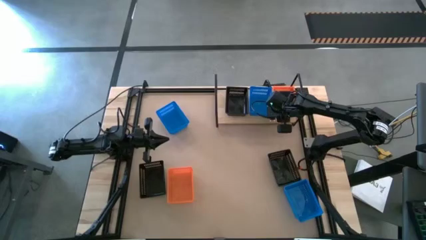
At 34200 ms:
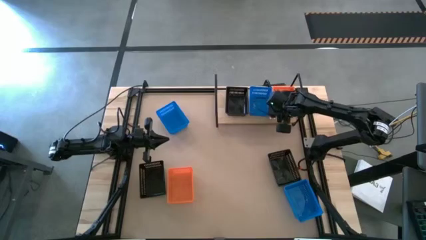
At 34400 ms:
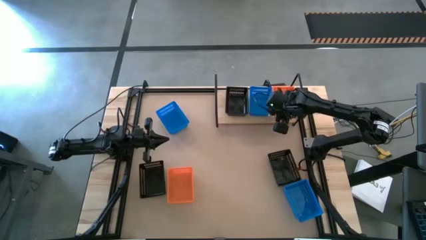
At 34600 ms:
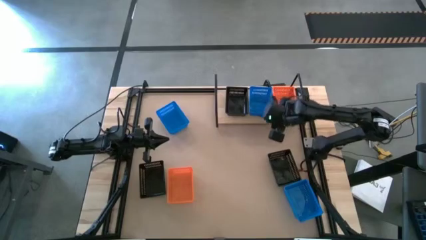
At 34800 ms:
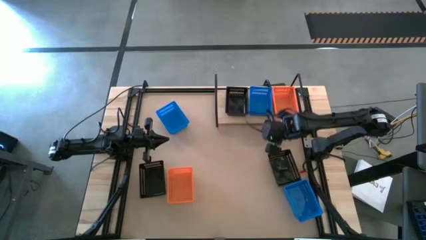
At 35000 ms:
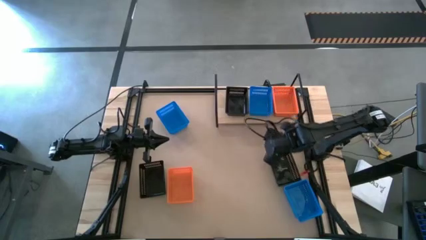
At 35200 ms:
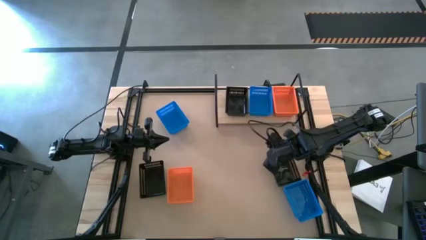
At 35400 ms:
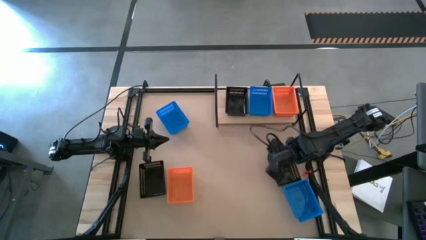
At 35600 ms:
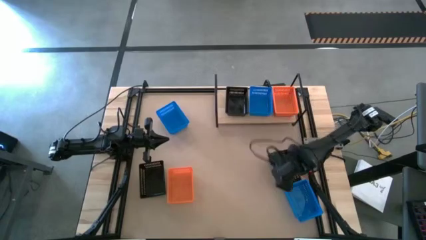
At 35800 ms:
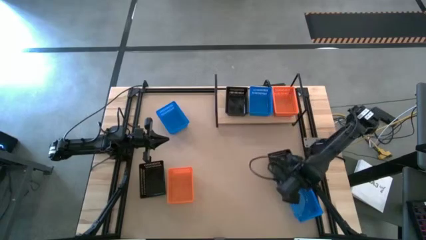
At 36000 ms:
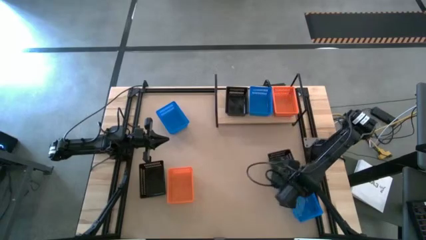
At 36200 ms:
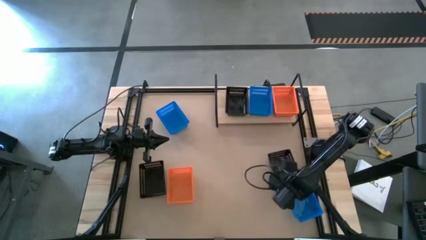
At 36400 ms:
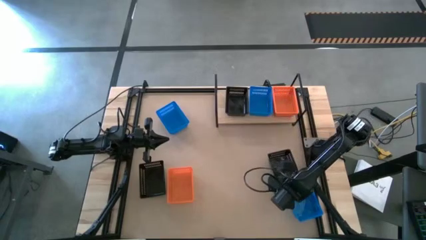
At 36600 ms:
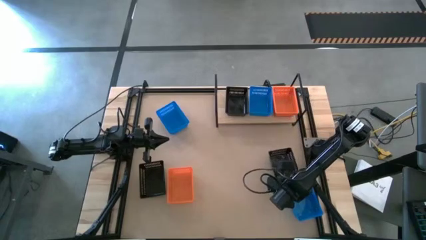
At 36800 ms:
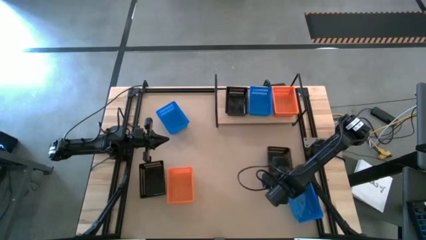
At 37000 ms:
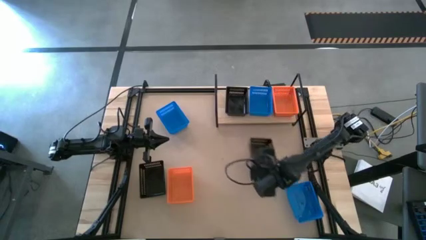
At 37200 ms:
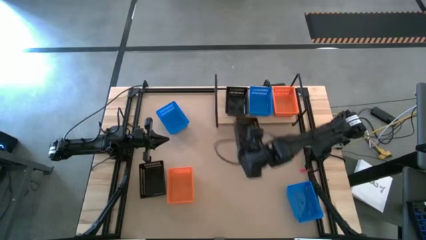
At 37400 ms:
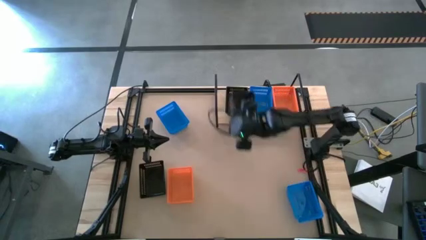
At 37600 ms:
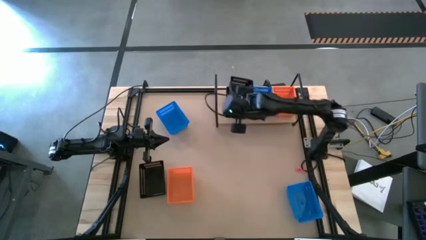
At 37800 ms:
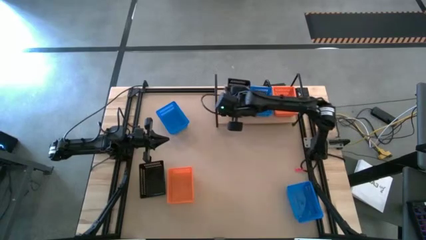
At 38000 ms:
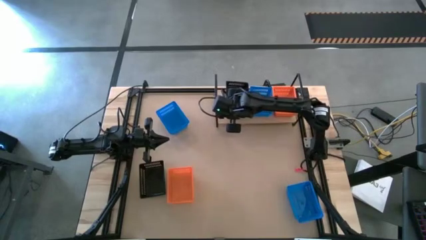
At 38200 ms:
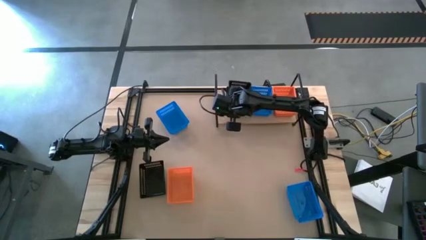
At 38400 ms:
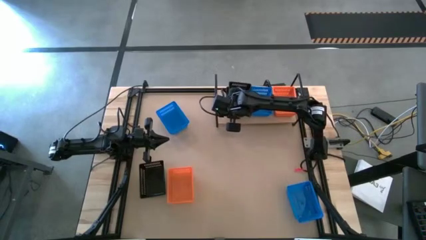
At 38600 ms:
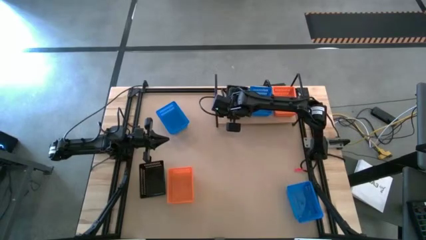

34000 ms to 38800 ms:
Task: Stack baskets on shelf by color
Stack the right black bin on top of the other black bin on the shelf

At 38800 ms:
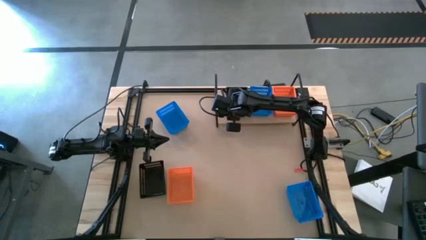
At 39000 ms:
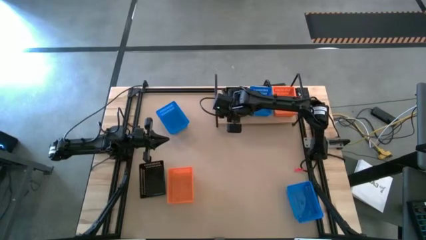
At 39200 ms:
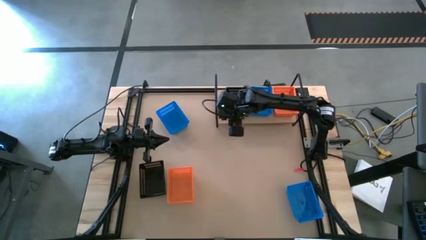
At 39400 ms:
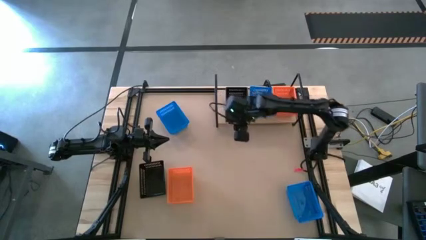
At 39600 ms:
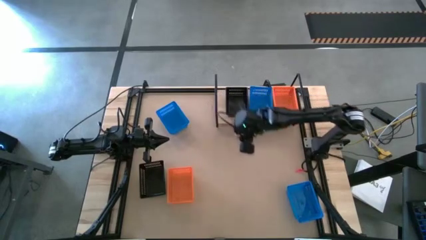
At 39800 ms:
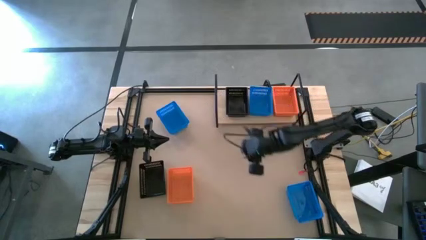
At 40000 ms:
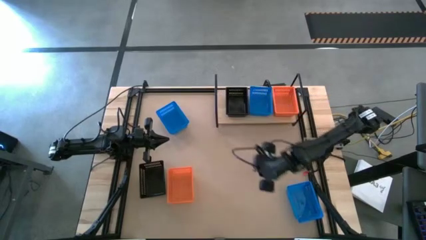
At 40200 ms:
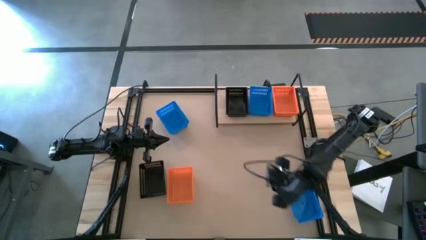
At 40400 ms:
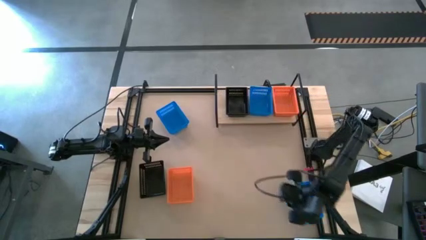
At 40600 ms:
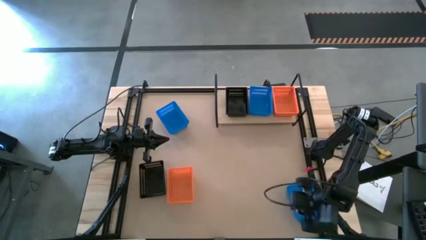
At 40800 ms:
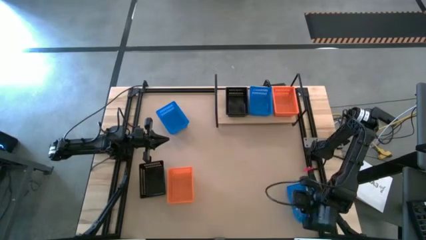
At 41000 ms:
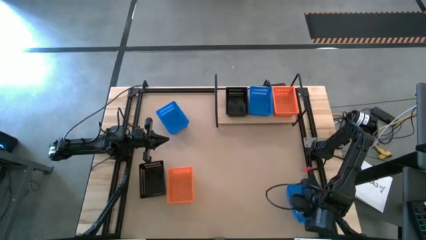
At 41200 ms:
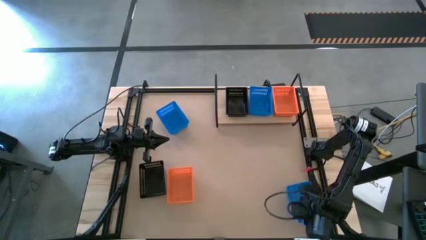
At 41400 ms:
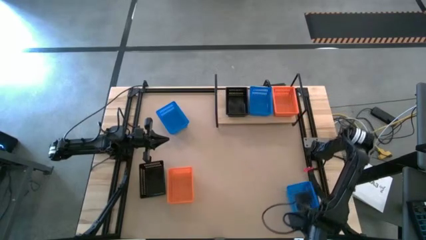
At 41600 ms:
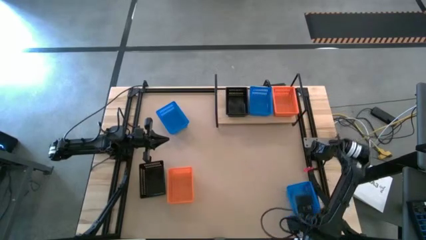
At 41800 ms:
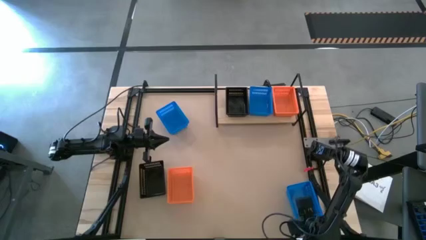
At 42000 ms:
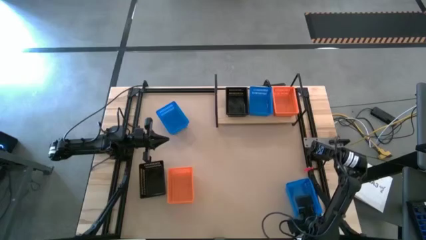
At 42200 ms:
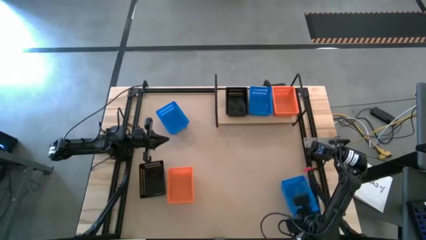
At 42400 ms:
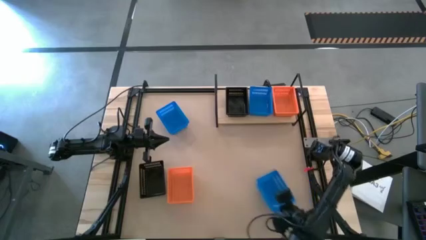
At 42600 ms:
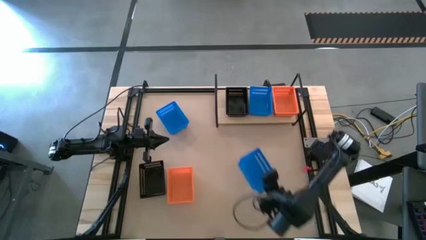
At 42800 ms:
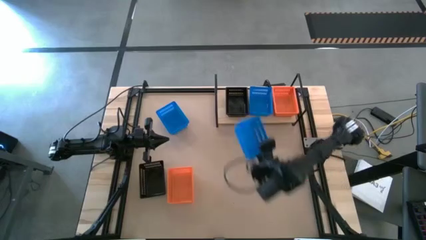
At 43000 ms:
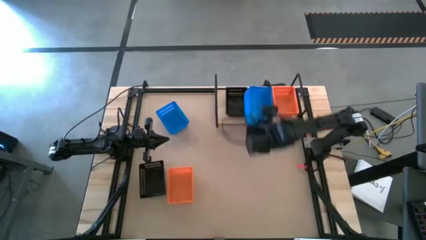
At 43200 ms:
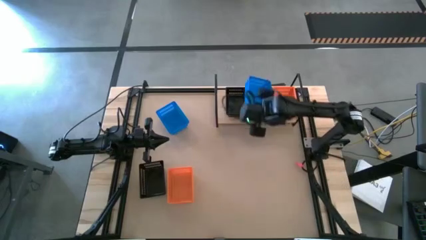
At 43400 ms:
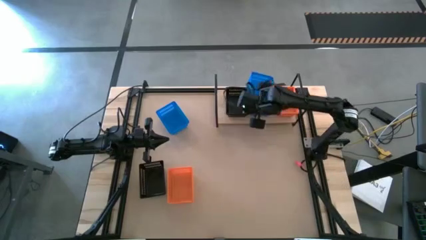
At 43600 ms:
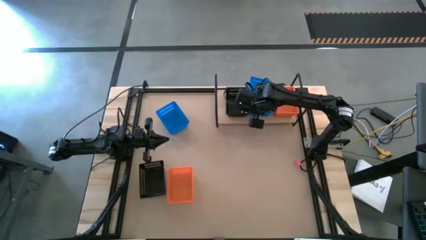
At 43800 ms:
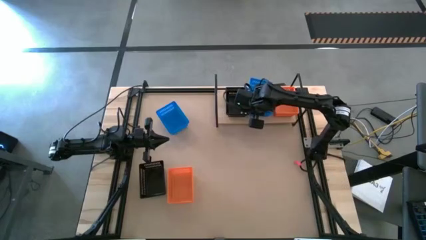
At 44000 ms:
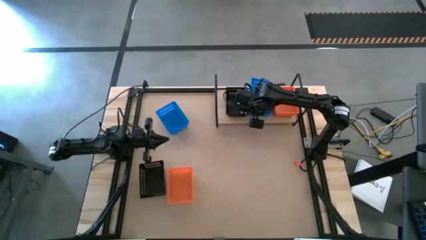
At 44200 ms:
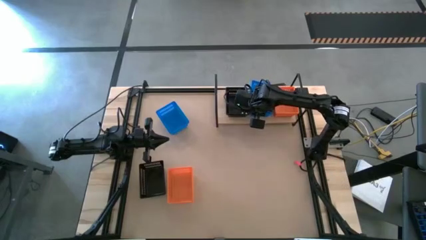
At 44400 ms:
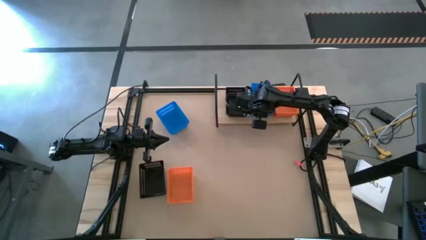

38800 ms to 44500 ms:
Stack the right blue bin on top of the other blue bin on the shelf

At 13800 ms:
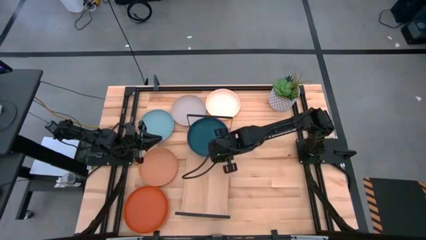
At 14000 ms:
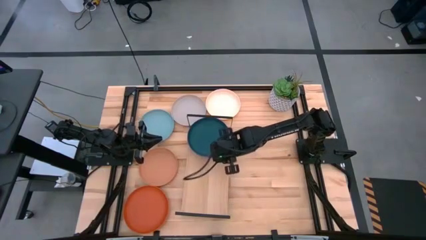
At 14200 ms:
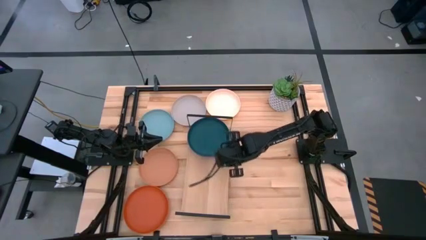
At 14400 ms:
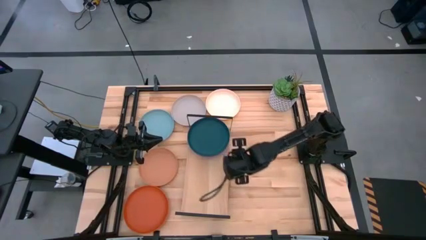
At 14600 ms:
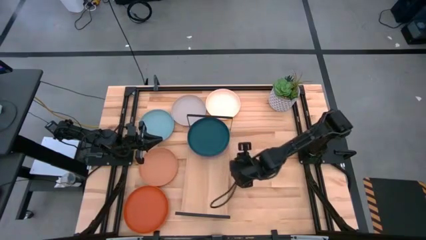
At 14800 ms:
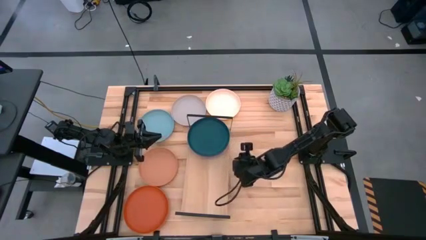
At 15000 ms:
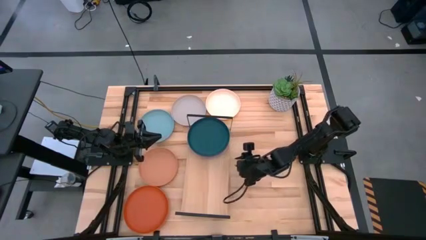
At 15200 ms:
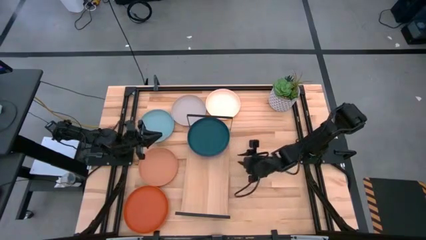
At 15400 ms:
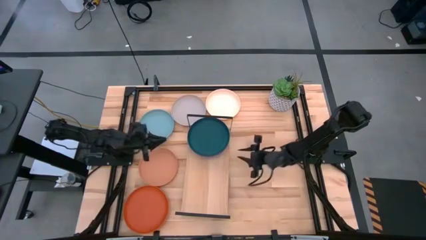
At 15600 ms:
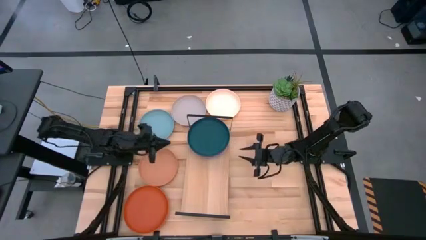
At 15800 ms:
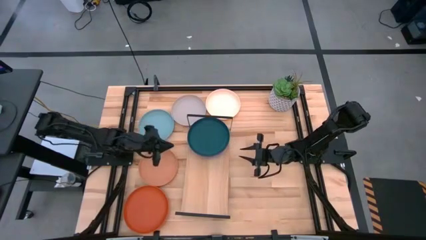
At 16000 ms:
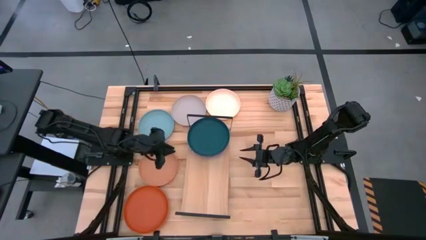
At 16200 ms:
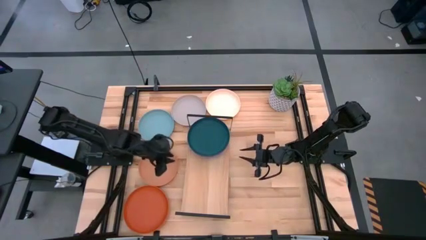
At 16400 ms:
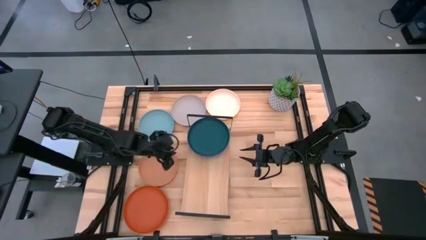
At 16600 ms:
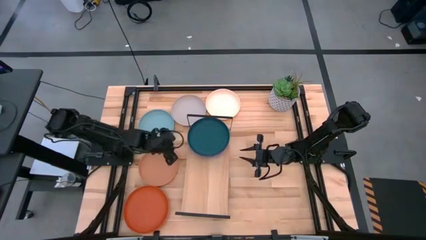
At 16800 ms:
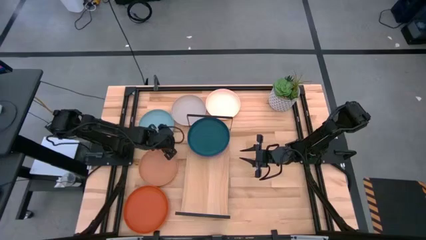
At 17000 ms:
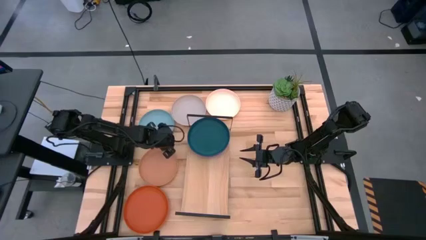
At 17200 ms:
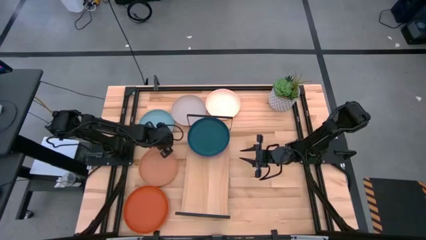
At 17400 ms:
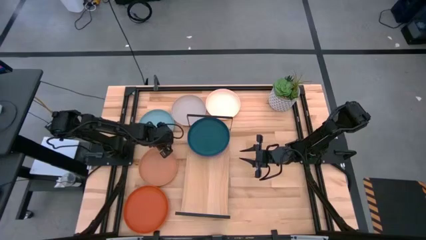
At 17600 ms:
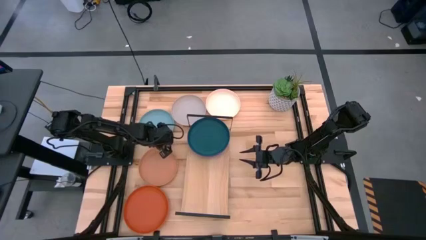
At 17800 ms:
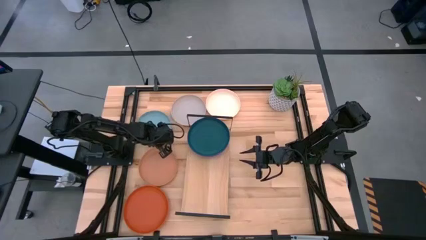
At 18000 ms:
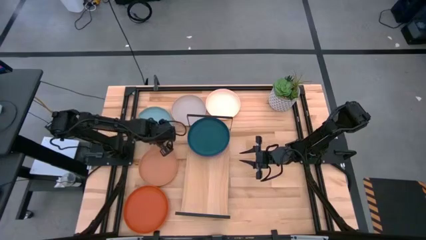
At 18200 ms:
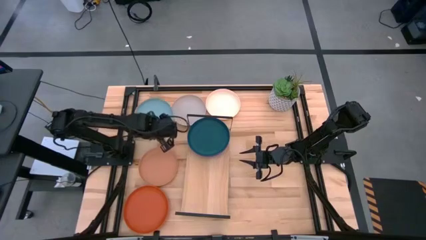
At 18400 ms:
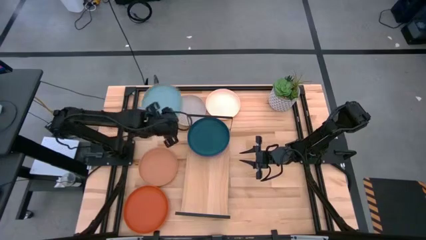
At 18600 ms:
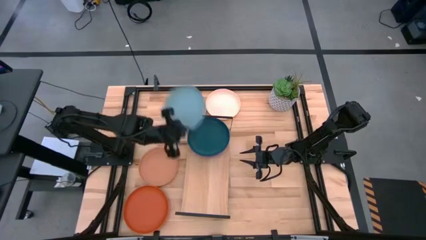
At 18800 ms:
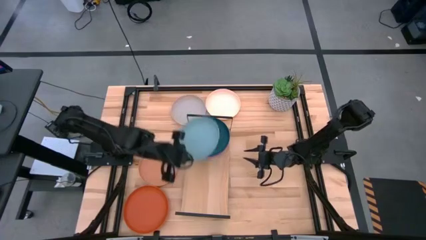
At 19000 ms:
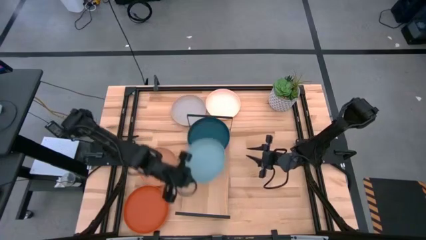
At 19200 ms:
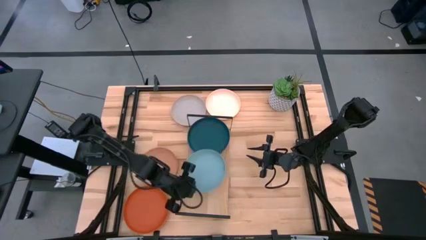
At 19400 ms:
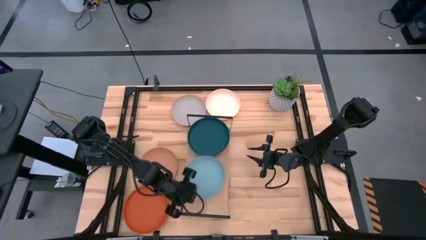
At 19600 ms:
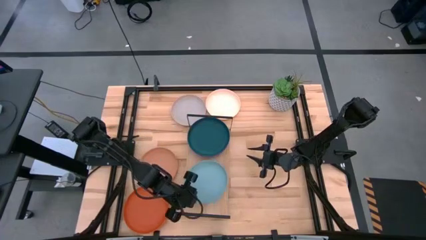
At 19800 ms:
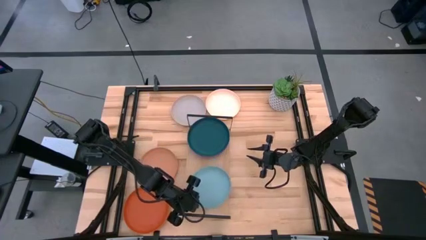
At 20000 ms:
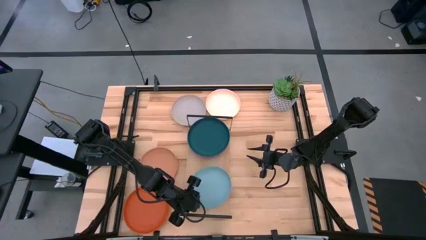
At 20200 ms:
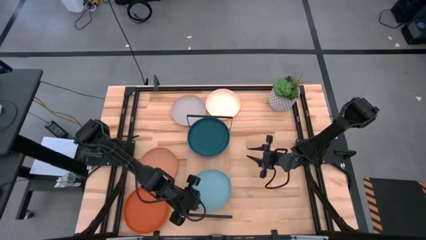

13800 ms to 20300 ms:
Task: Place and stack plates onto a shelf
Put the light blue plate on the shelf
